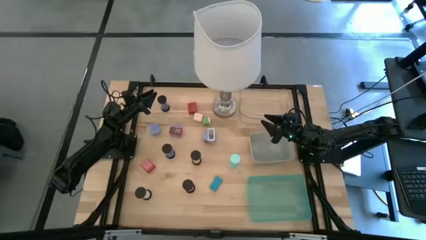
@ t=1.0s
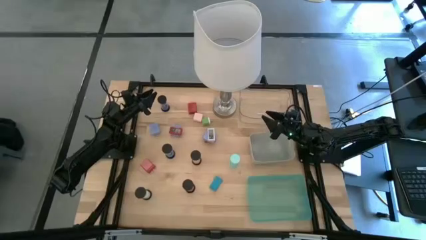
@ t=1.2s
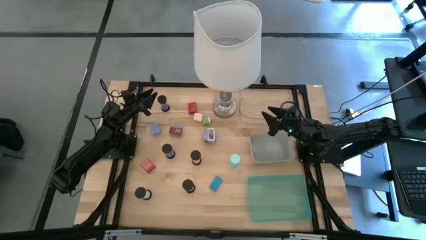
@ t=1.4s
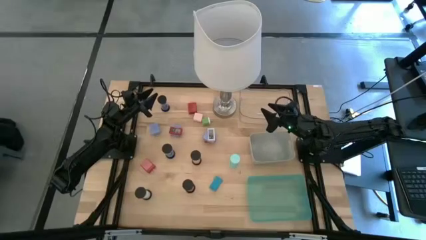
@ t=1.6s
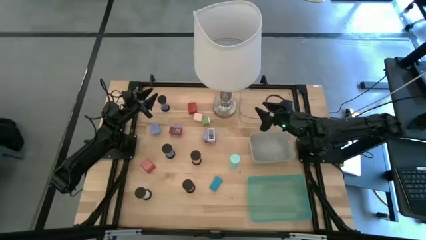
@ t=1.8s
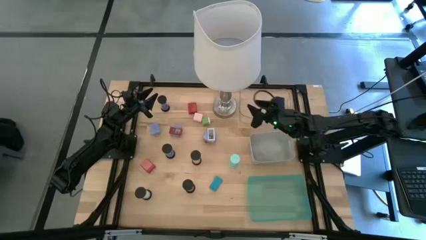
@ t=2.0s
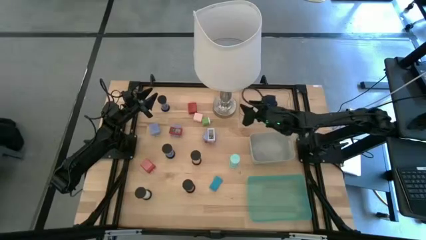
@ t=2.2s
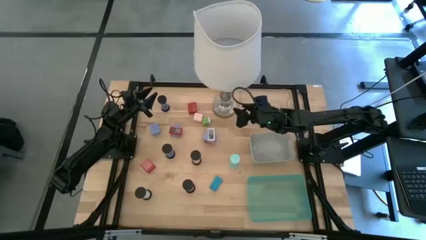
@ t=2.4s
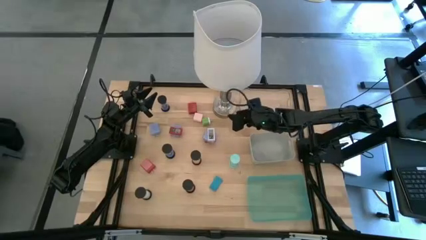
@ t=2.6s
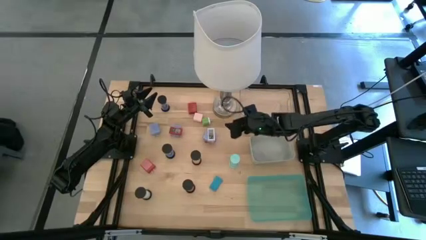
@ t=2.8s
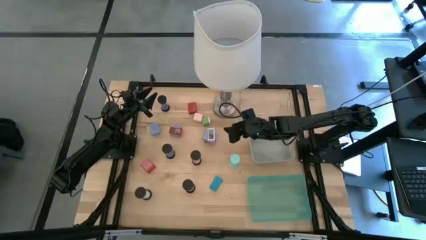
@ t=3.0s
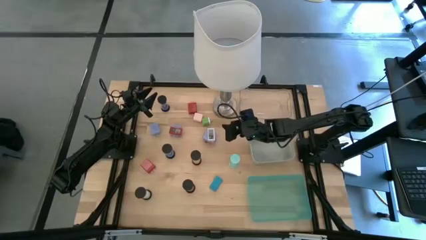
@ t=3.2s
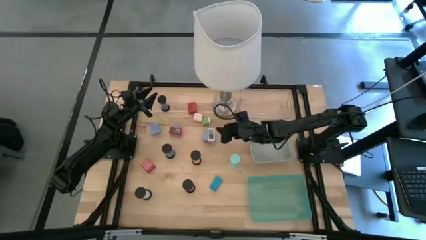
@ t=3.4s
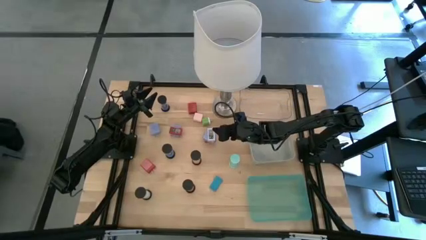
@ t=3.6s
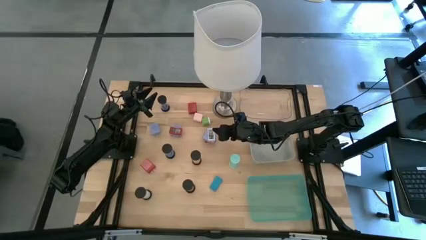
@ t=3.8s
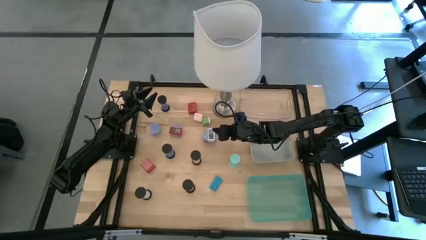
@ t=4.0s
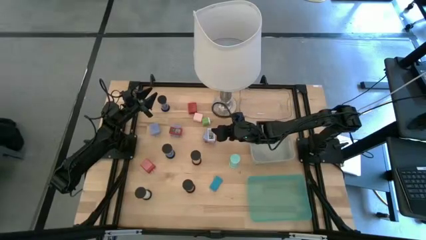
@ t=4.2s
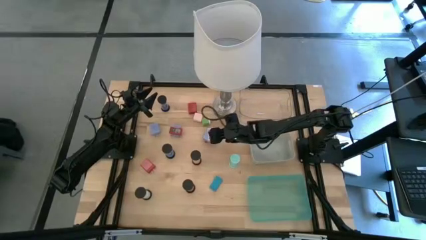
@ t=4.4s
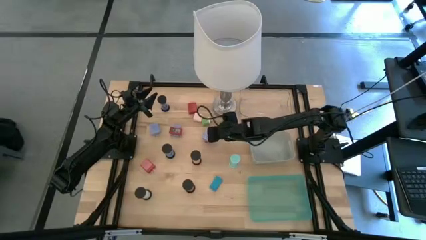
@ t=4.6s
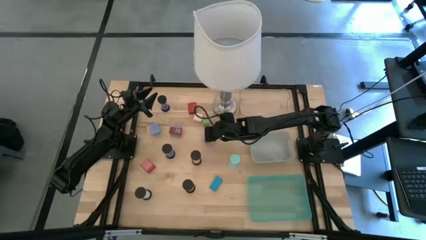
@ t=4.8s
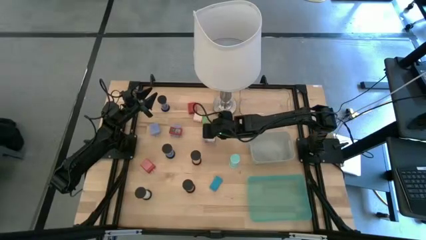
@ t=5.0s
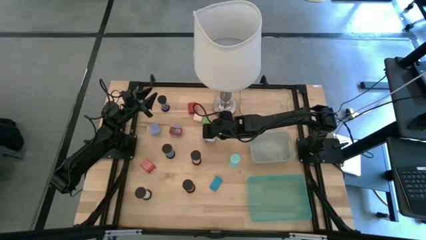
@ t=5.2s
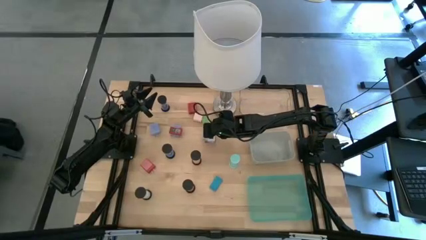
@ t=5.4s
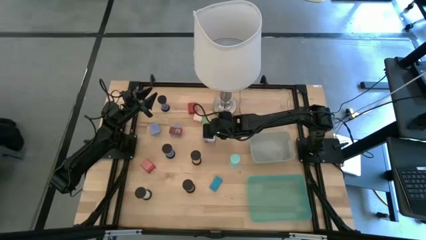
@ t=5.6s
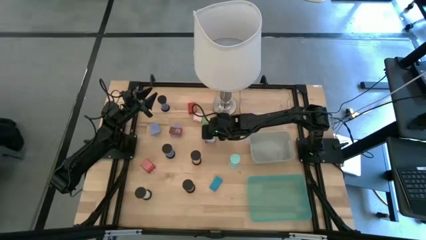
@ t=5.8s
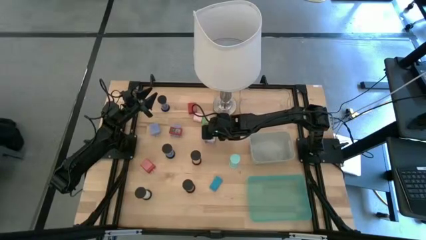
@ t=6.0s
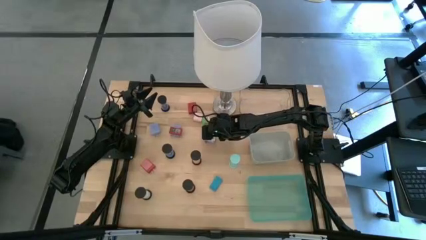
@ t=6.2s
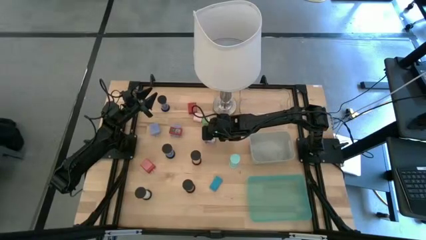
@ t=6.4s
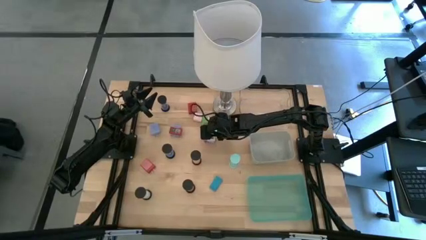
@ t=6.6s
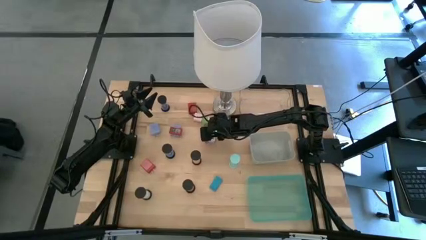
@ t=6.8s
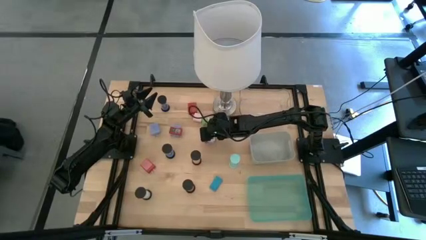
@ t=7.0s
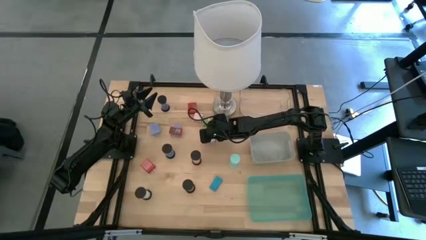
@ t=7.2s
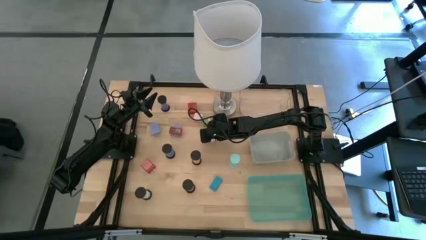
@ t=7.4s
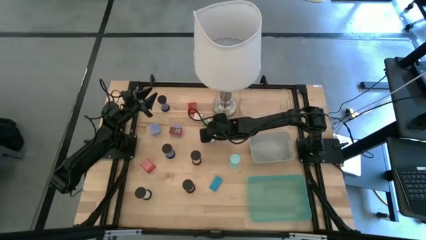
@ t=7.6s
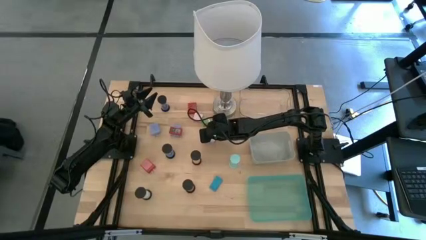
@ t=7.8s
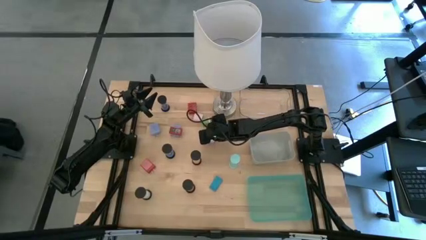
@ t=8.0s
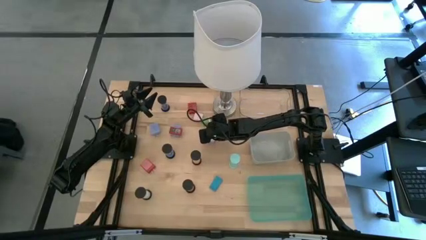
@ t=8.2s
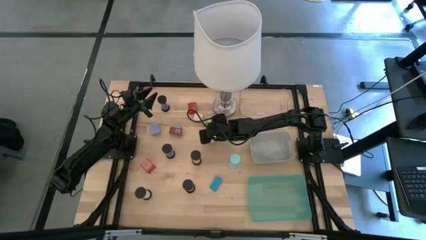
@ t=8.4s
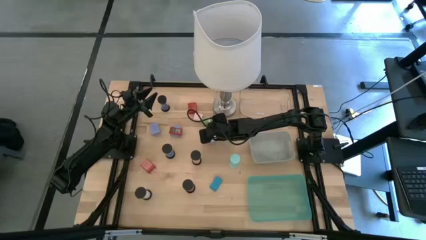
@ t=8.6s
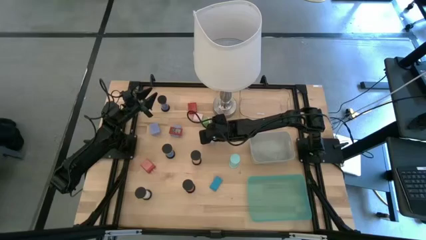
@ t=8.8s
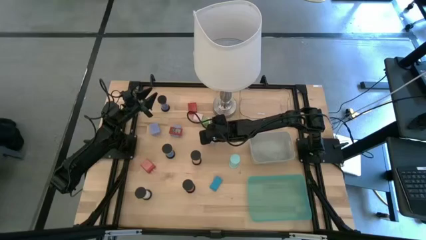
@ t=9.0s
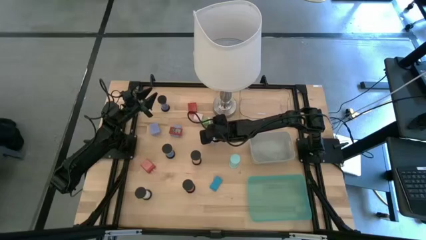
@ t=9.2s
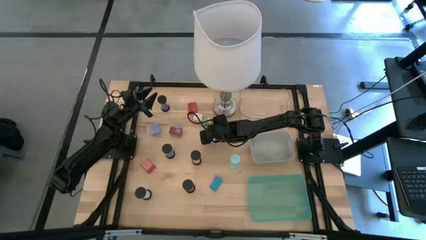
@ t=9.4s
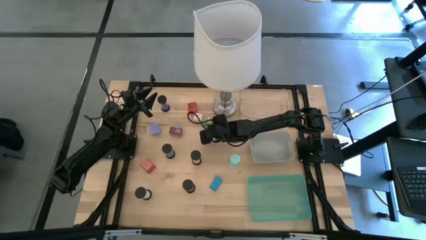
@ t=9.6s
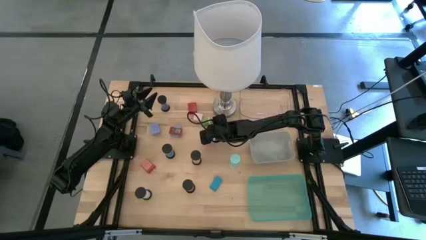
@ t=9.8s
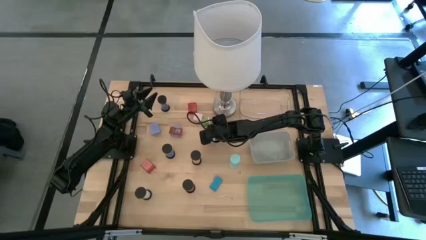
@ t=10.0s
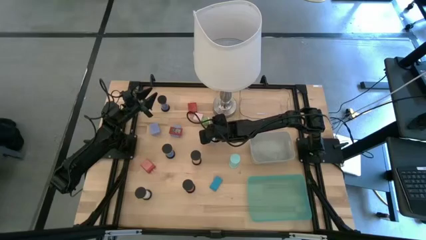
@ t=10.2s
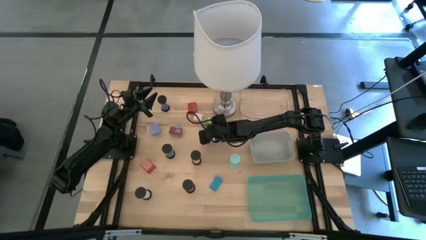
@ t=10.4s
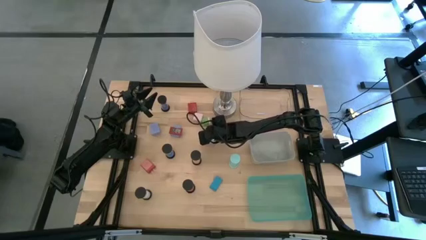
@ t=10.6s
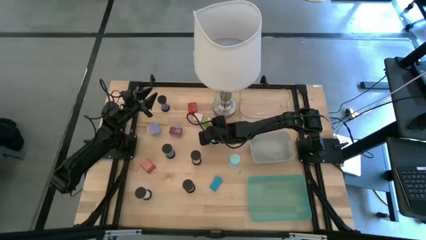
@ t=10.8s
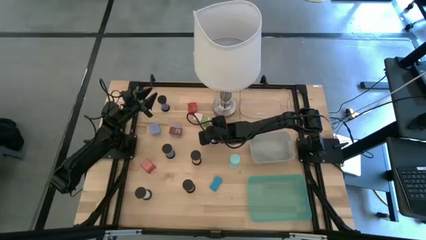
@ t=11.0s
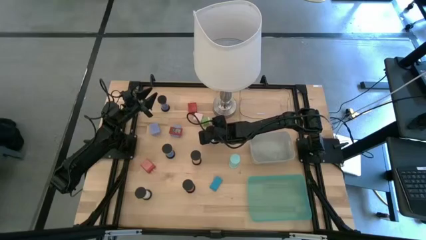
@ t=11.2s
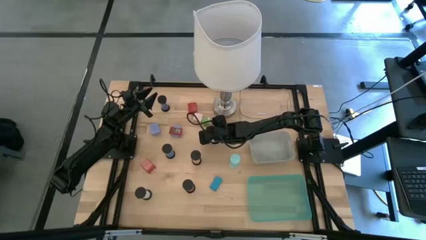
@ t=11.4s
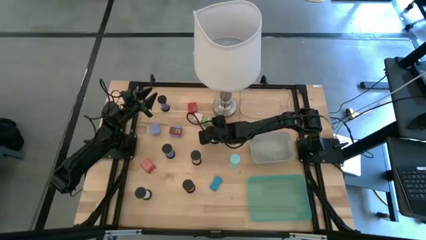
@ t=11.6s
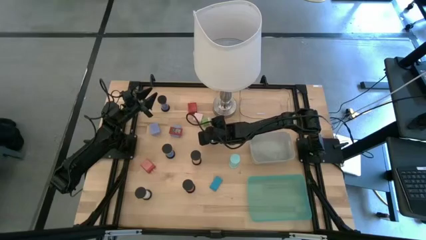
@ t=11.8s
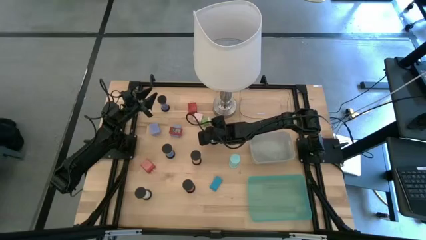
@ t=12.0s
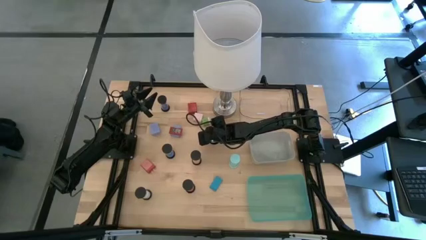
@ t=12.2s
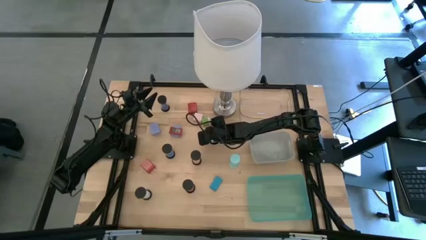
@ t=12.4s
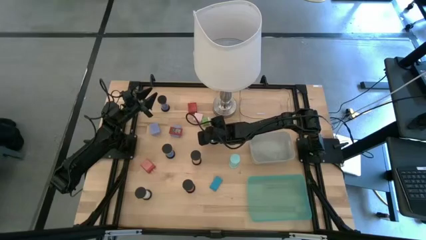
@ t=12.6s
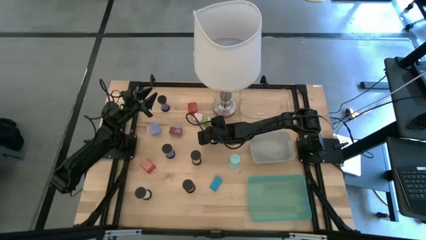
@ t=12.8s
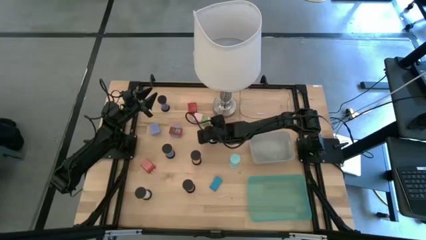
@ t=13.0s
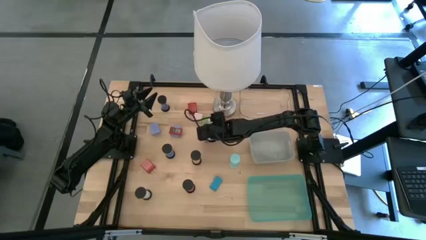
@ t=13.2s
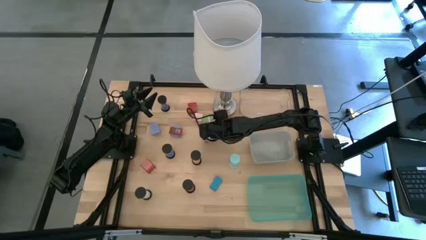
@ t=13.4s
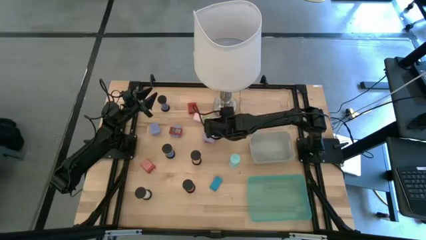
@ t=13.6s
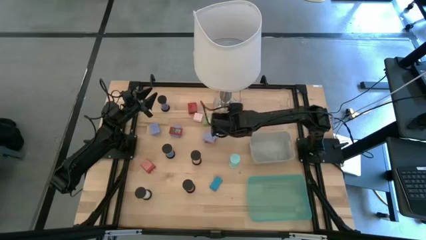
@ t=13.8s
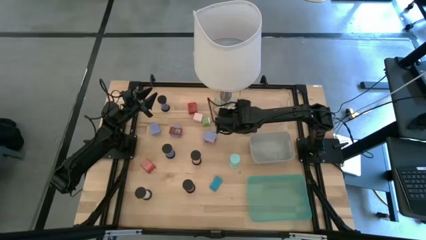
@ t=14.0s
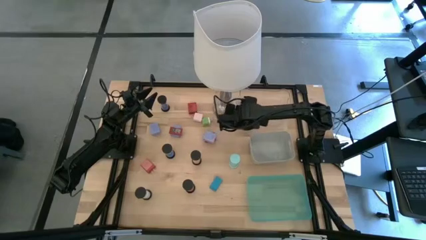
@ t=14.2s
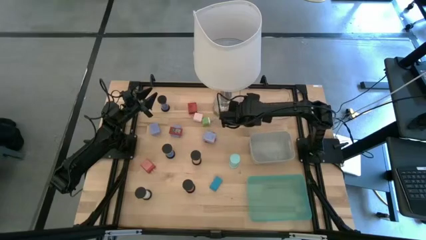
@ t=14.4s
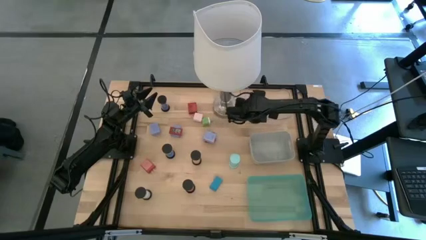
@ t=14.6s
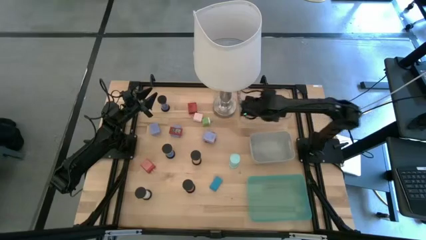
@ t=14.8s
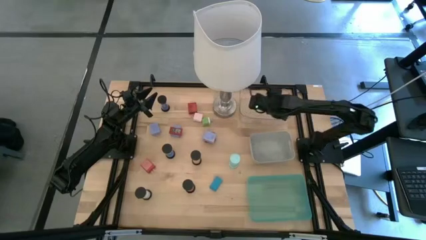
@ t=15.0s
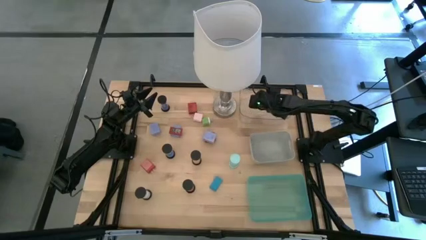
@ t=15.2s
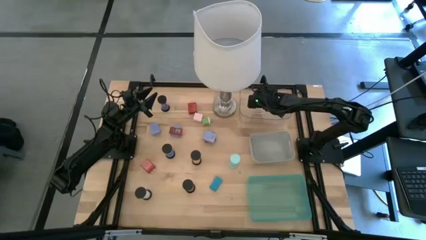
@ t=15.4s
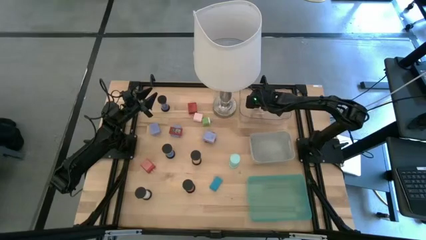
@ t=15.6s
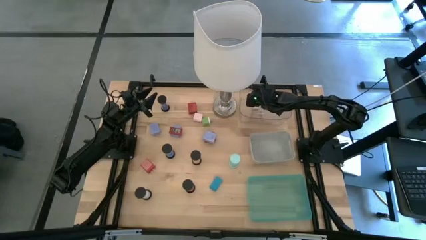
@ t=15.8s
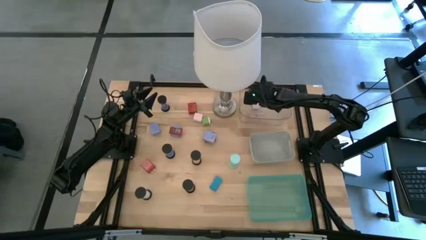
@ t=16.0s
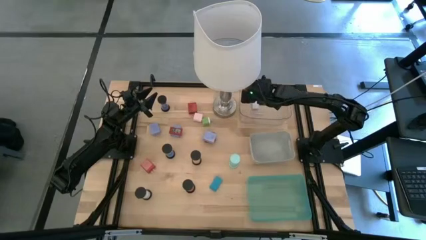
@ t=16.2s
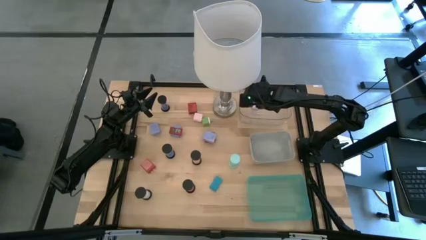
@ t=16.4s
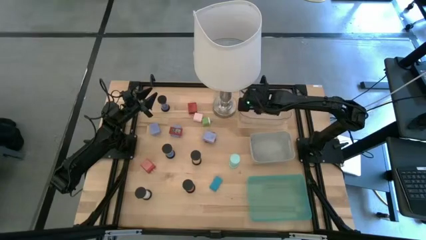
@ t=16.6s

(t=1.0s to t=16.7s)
Task: Pick & Place Office items
Put the white timer into the transparent bin
